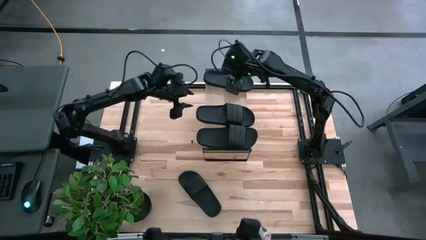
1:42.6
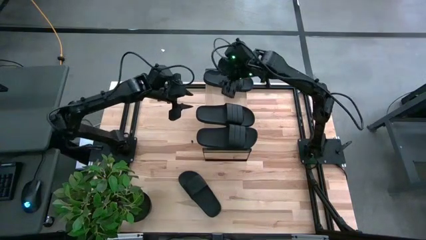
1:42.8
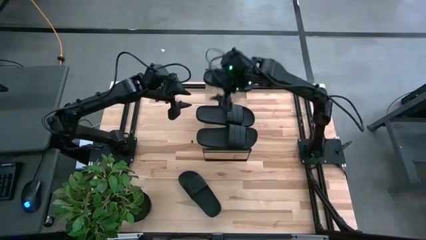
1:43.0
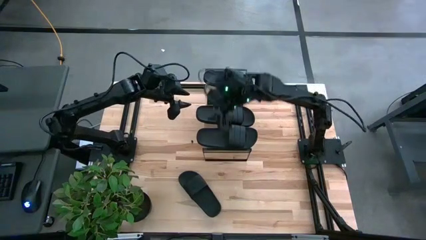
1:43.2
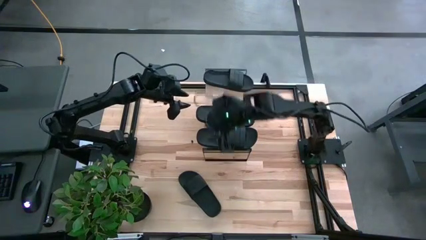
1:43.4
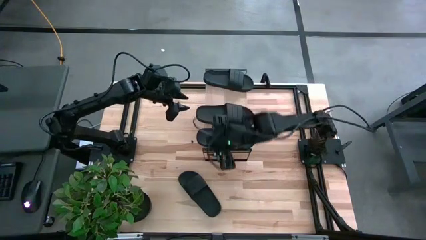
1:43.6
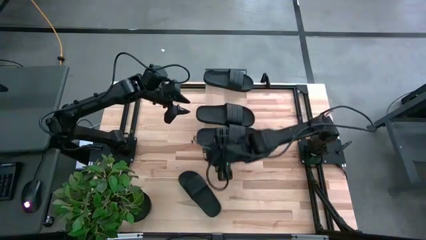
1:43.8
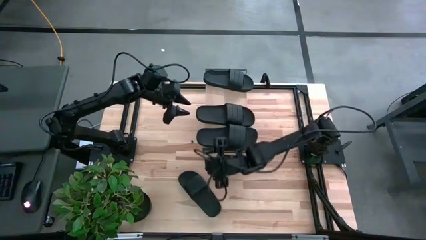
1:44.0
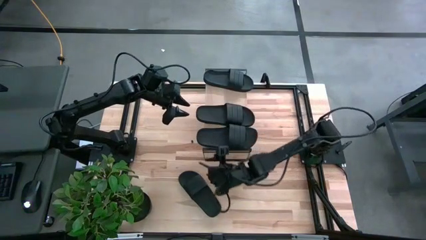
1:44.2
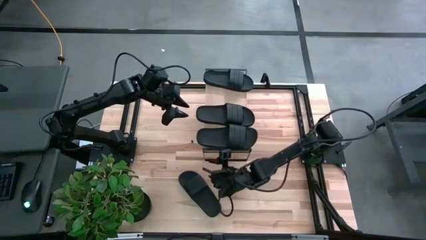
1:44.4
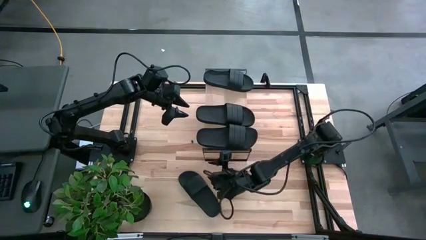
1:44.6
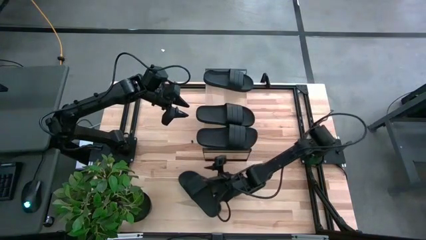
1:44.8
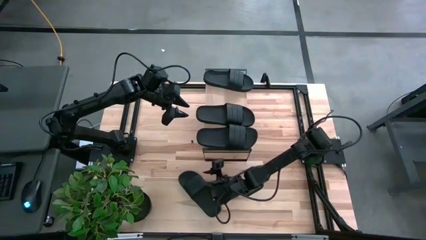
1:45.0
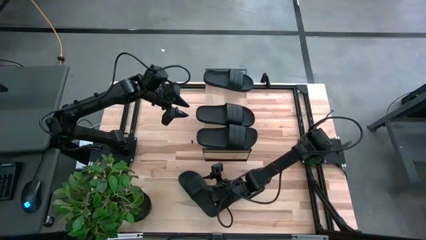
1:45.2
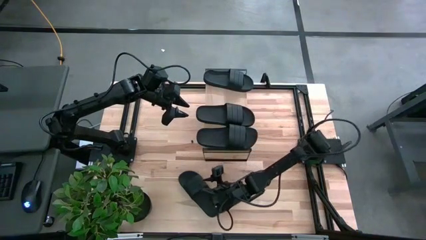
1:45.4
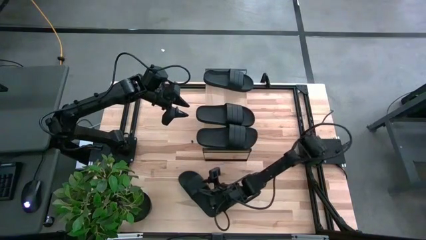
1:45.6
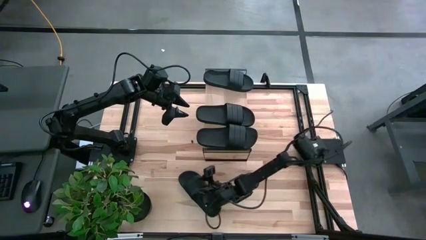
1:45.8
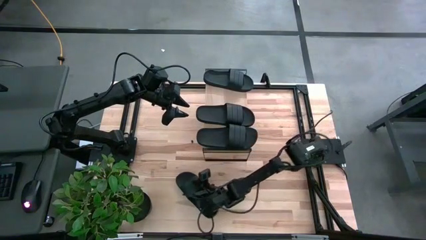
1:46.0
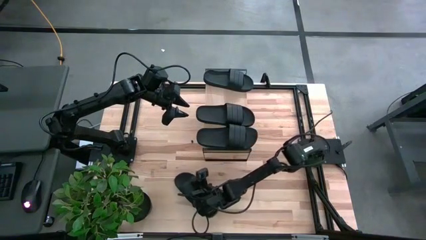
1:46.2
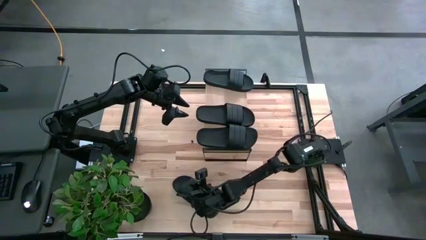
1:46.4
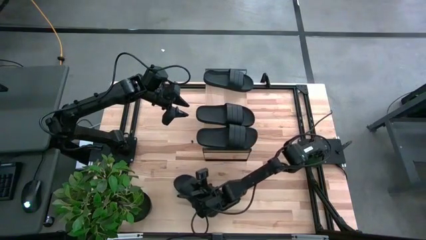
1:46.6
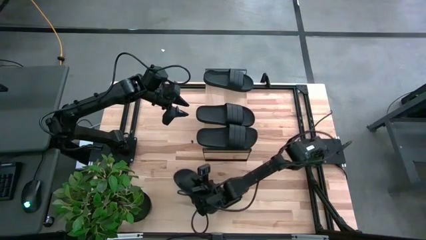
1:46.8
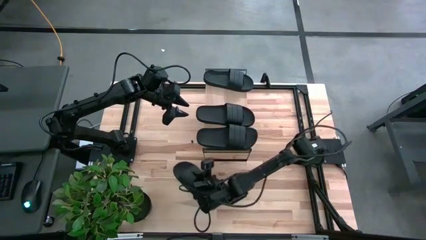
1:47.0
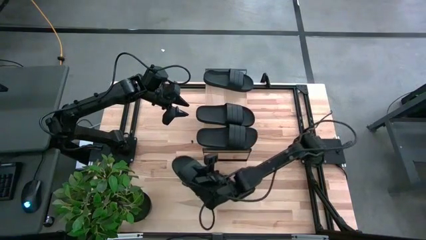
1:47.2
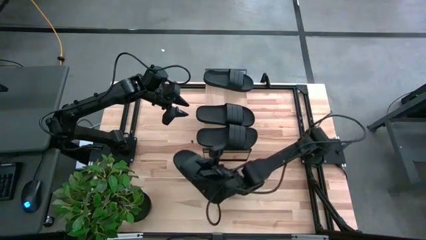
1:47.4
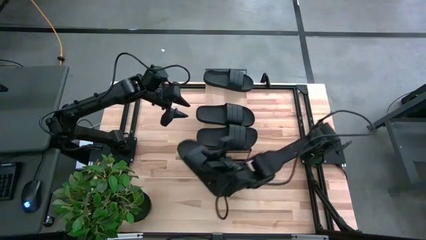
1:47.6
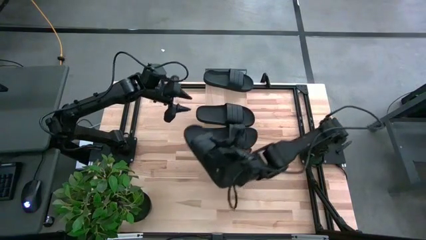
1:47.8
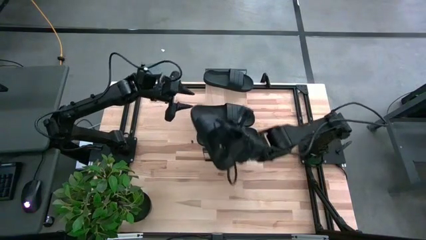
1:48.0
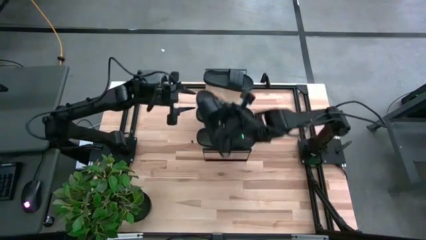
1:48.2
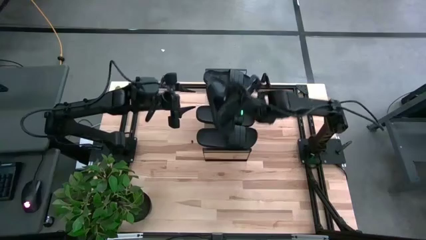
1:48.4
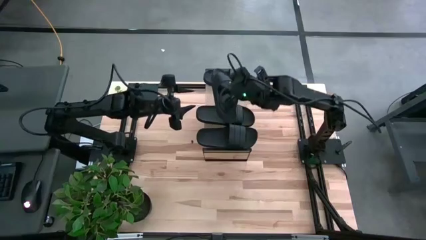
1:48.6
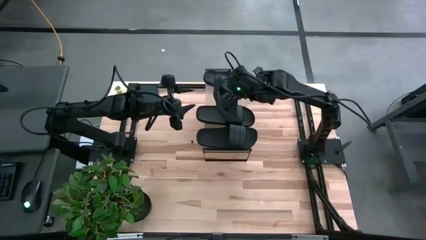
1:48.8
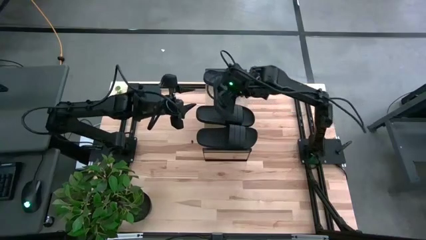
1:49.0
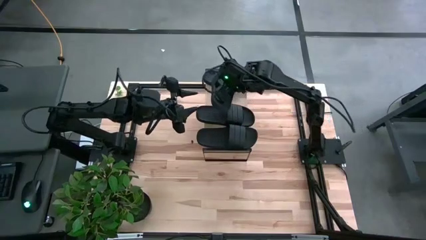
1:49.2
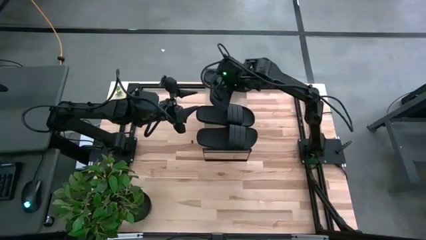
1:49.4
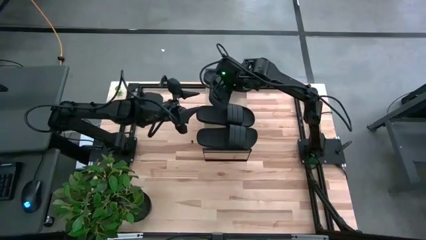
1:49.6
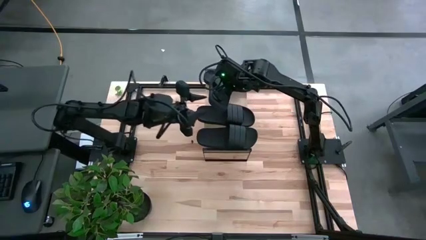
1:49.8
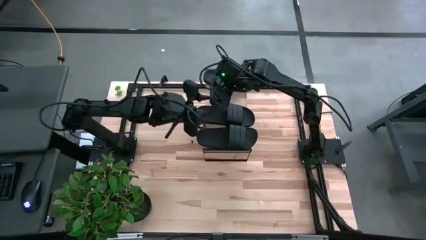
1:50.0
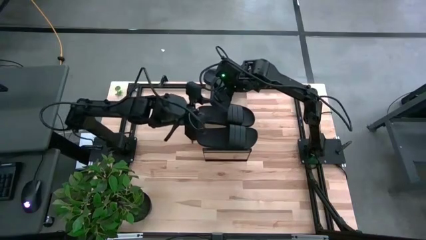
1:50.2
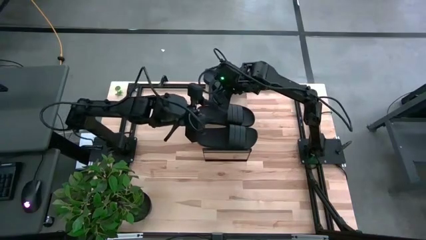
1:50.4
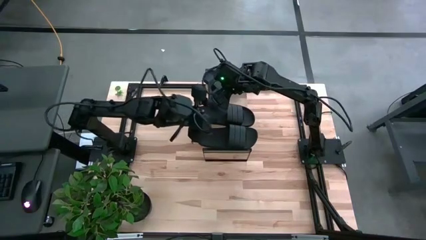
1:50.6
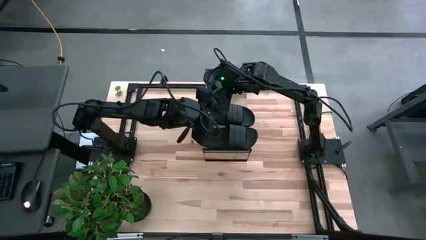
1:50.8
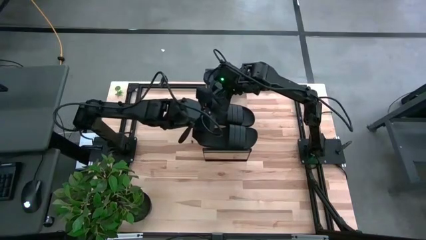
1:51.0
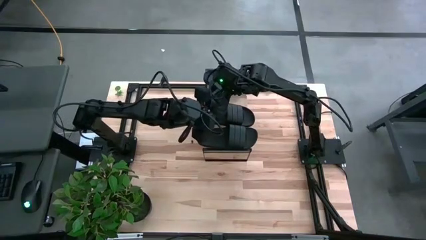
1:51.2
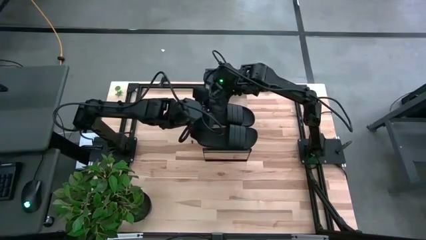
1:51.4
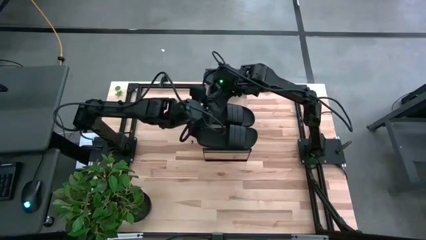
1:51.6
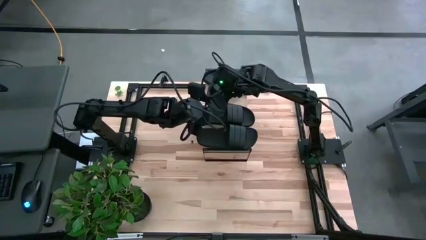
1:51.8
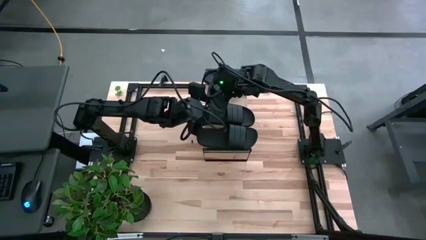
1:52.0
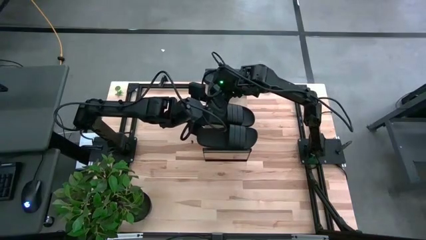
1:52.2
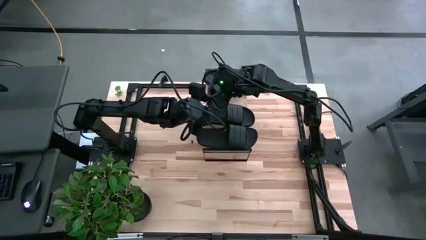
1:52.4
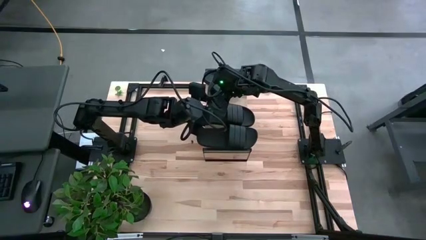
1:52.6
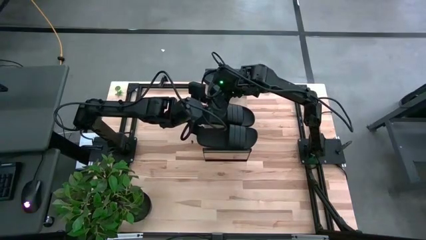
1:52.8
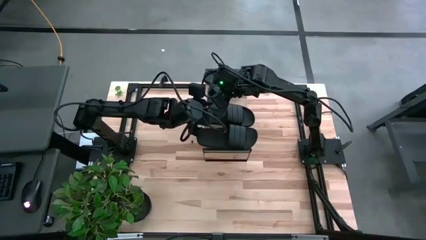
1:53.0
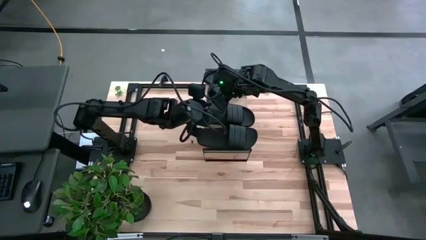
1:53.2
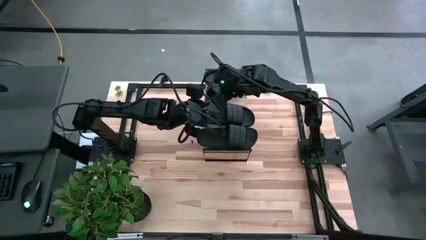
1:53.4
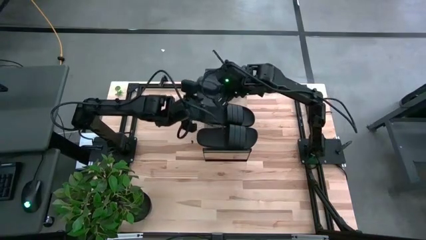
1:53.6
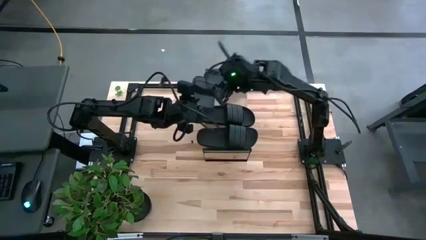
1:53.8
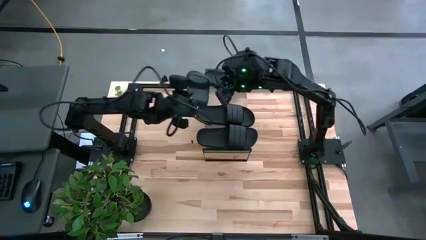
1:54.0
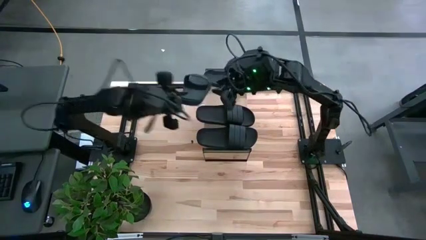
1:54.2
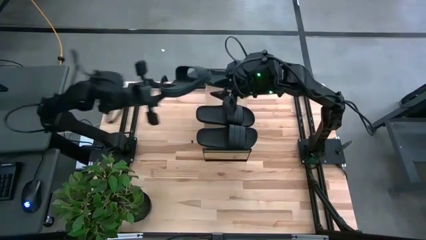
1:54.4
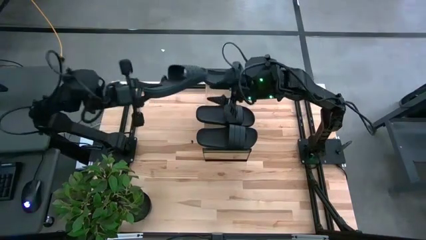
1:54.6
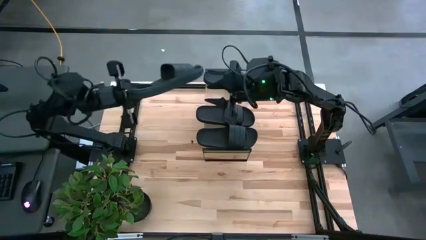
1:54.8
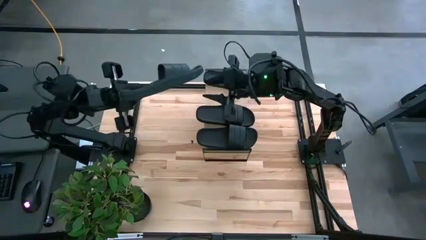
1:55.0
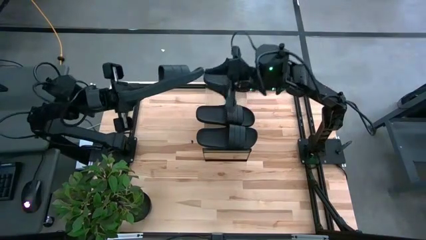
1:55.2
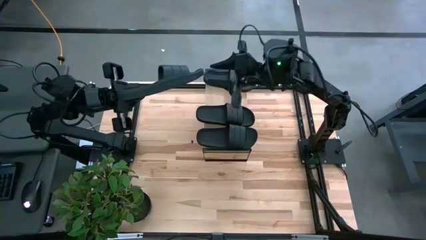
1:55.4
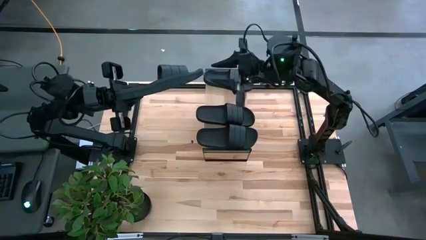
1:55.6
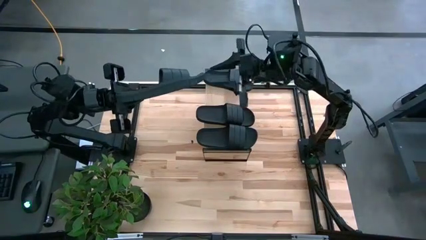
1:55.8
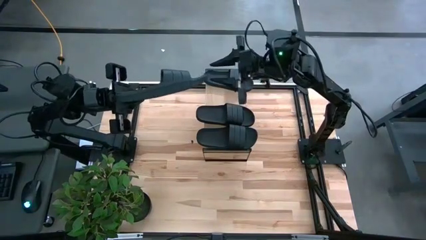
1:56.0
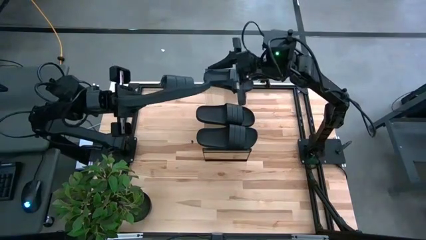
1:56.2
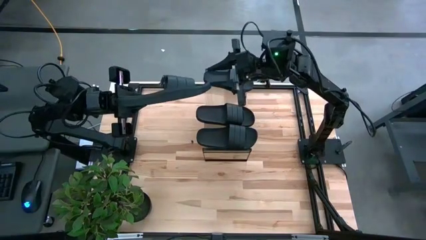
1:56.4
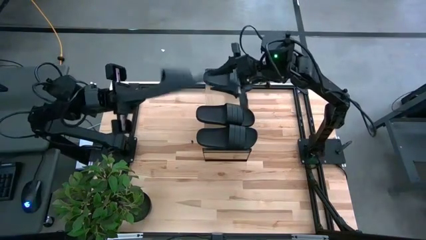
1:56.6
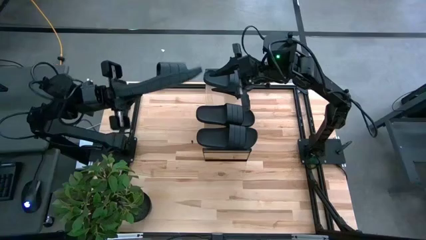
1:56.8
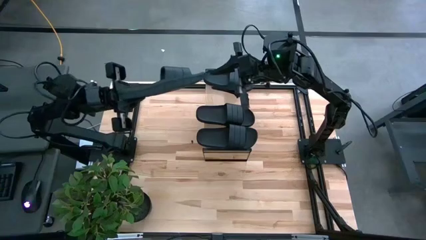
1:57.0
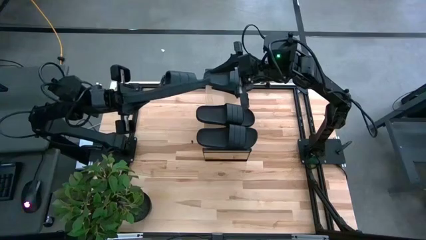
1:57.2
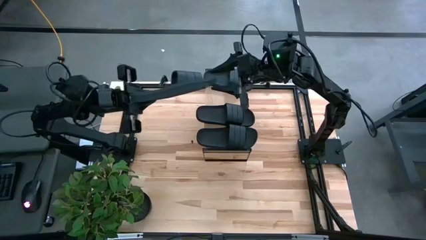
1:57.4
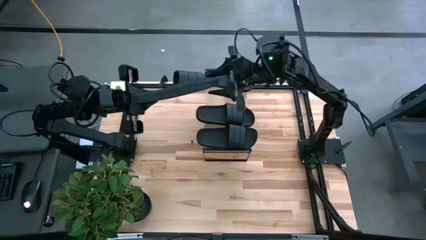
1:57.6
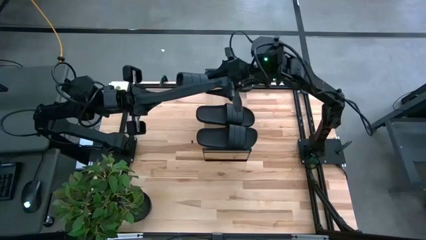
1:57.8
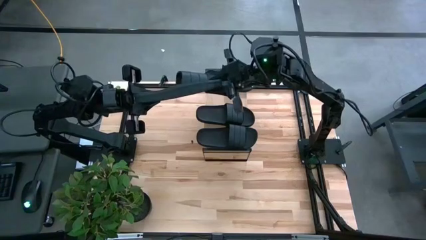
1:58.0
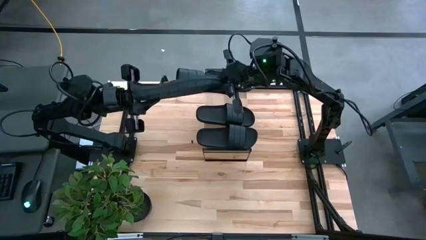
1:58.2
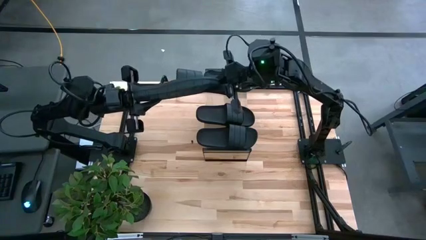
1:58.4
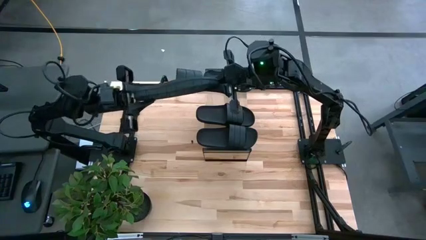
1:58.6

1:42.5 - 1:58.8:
Task: Pick and place slides into the shelf
Put the black slipper on the shelf

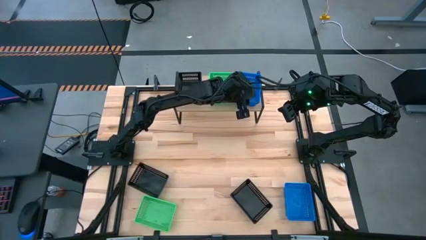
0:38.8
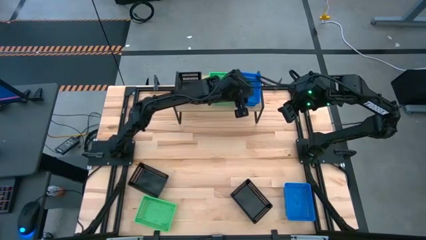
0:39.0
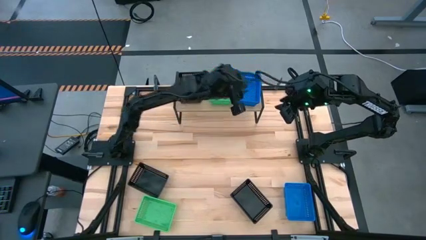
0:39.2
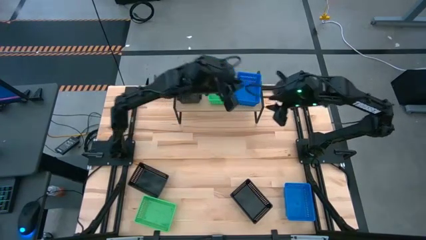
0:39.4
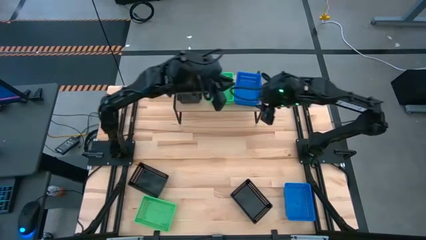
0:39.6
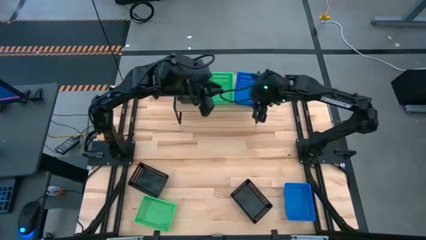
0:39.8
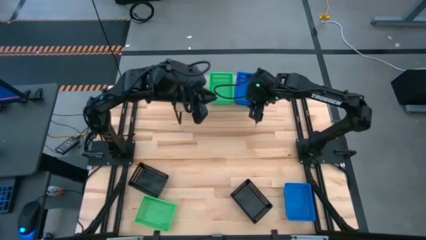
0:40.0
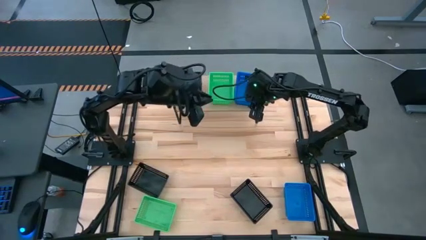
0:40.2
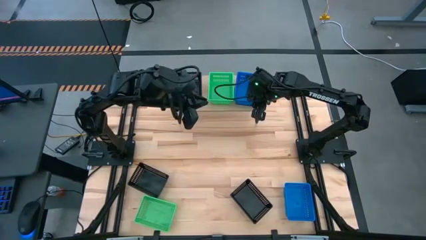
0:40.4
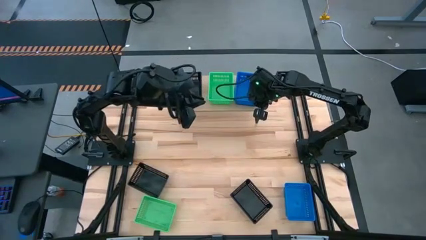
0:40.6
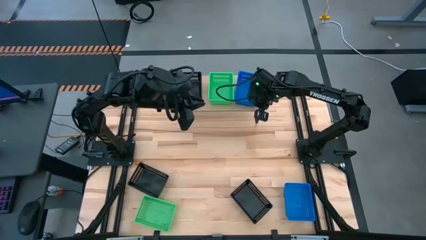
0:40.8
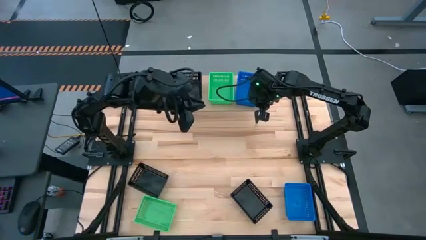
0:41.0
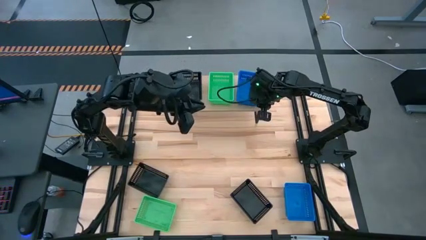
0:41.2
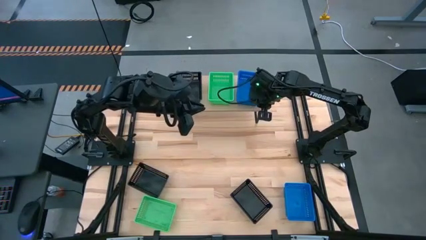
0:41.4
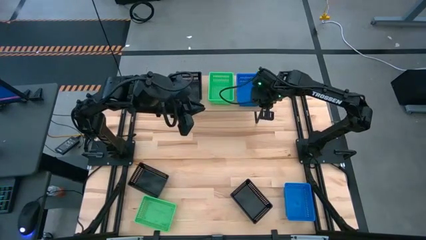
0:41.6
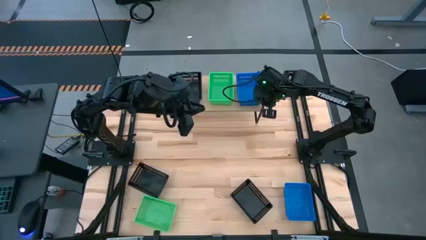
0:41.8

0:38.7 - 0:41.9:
Task: Stack baskets on shelf by color
Adjust the stacked blue baskets
